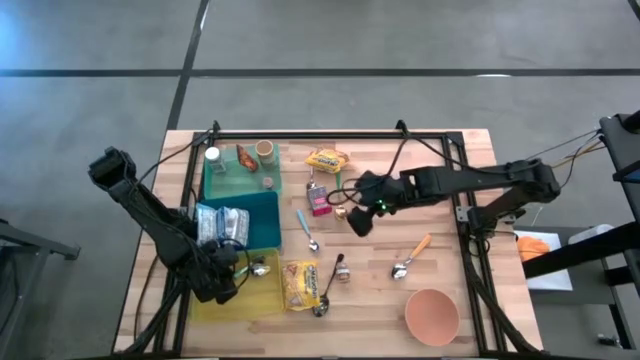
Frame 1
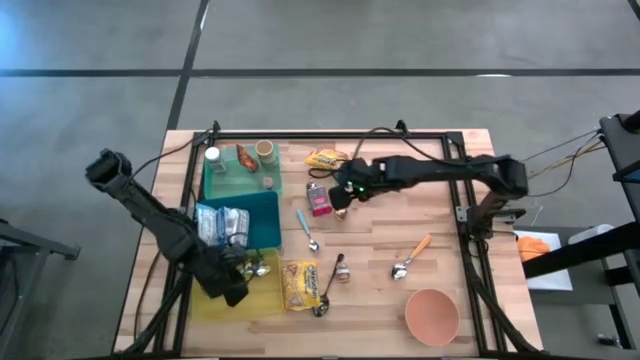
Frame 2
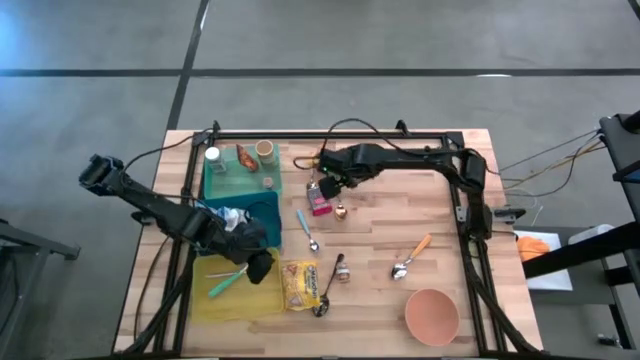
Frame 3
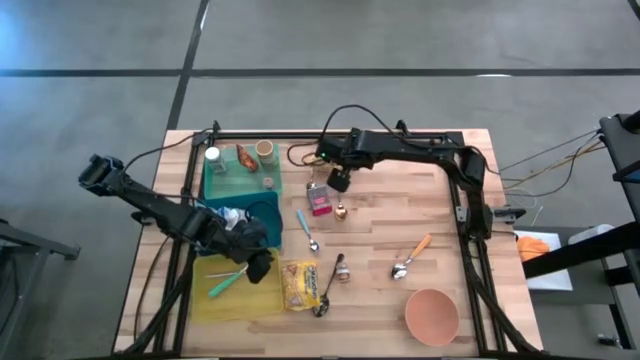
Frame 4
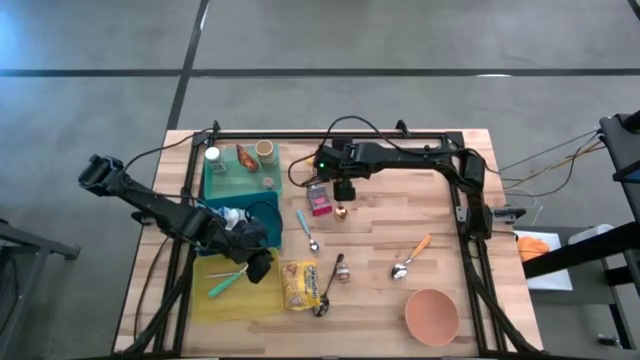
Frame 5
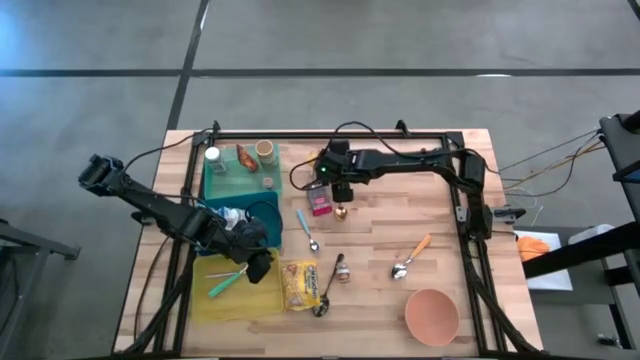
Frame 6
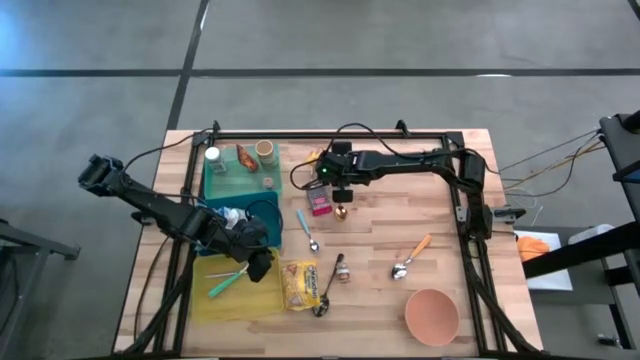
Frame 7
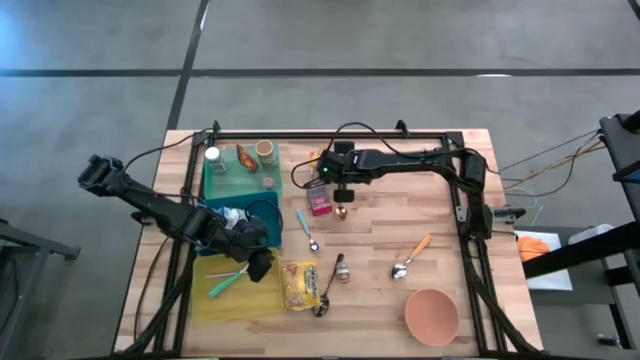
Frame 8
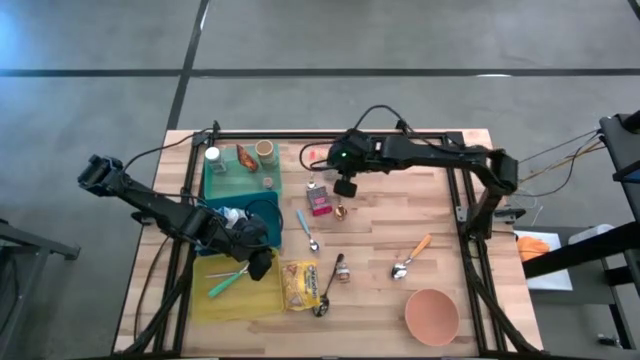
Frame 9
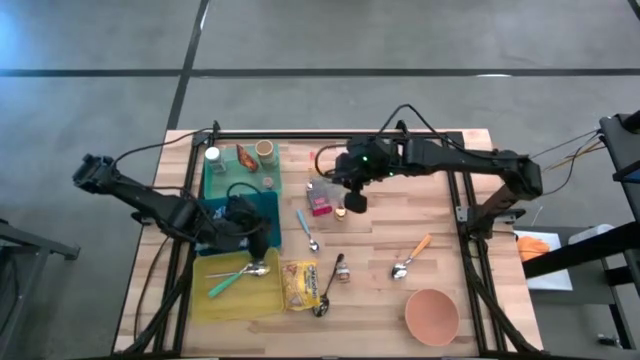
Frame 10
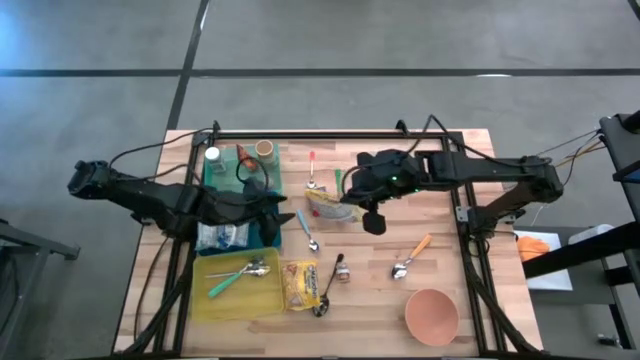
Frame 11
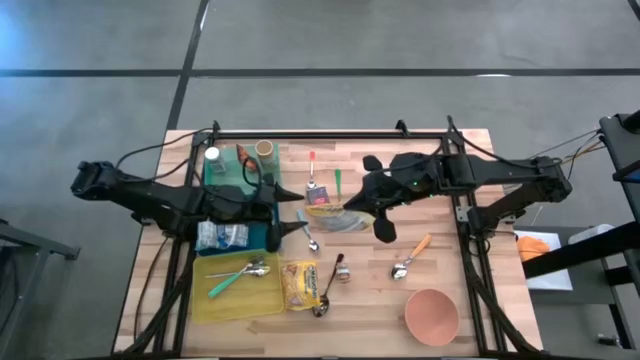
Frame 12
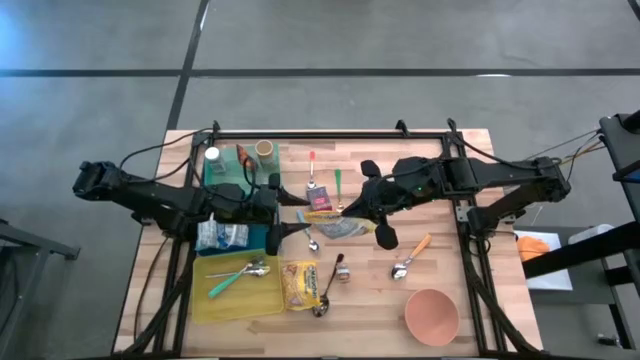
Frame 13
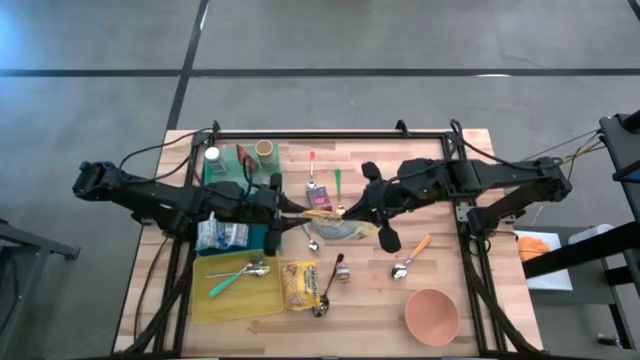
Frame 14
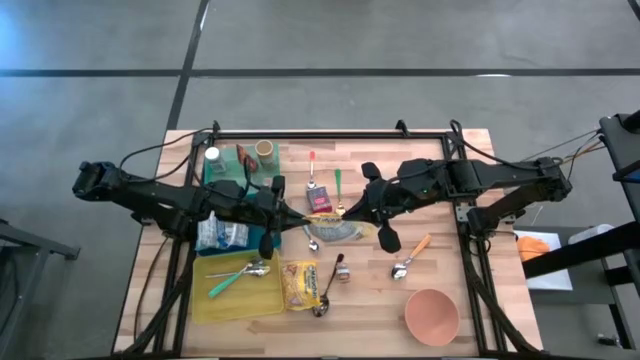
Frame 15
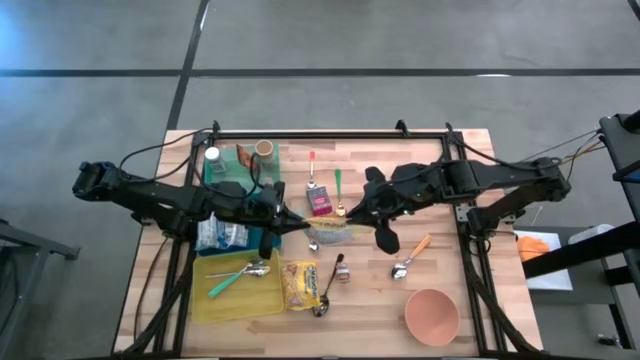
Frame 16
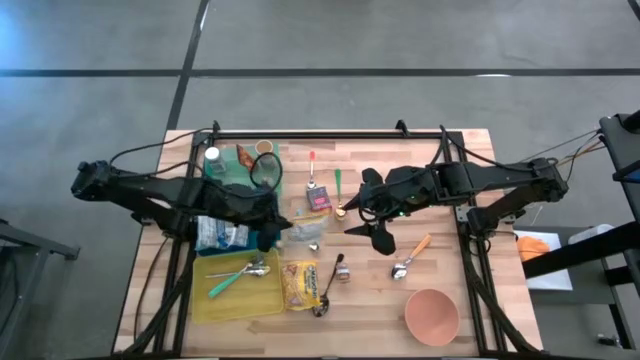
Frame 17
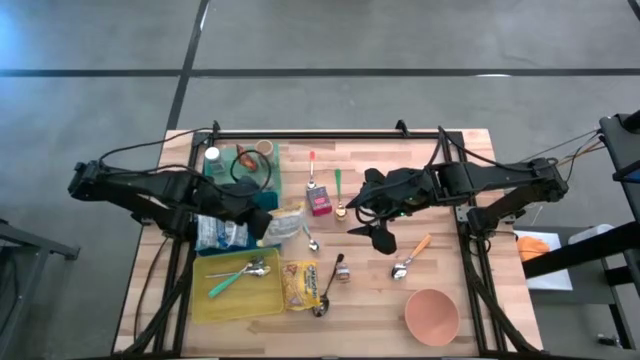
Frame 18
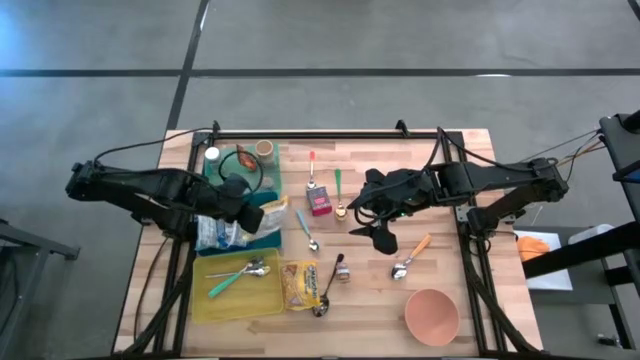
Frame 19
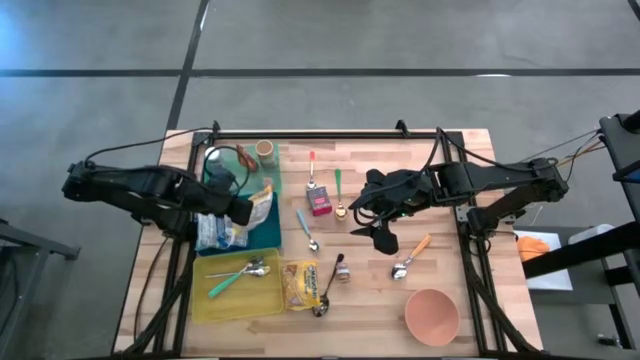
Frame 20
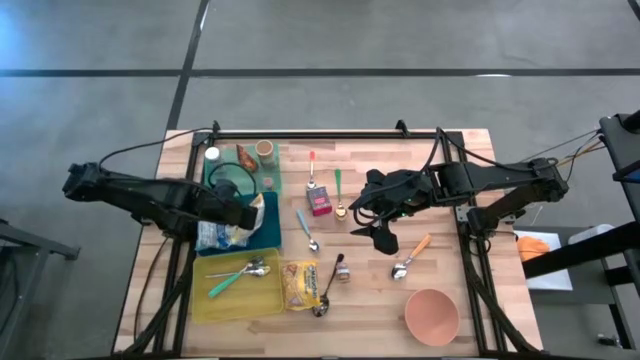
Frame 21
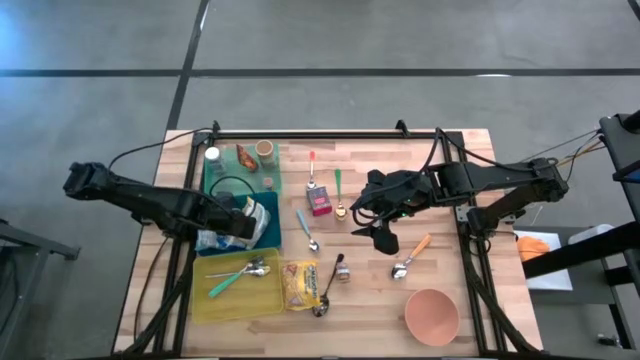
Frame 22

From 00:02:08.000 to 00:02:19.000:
Put the top yellow noodle pack into the dark blue bin

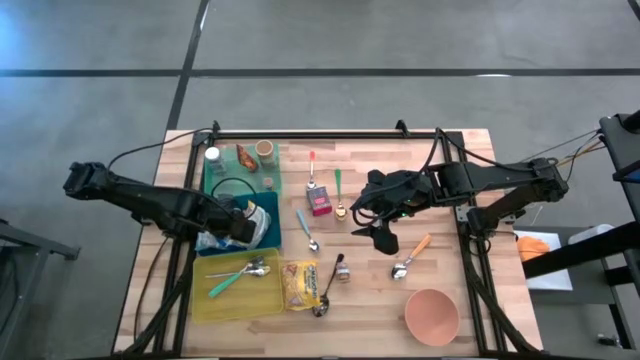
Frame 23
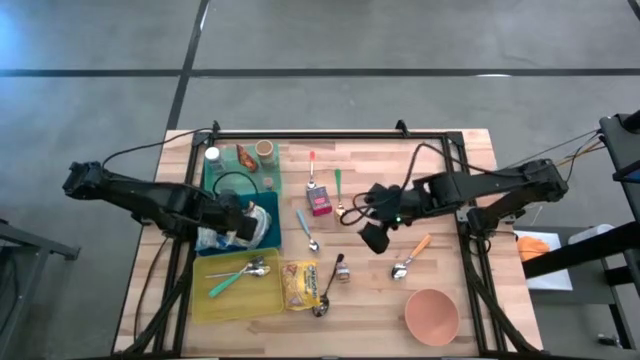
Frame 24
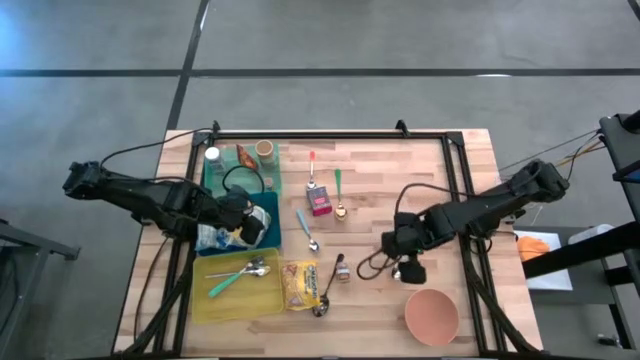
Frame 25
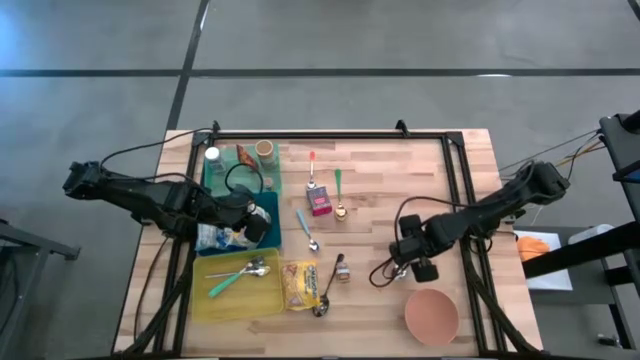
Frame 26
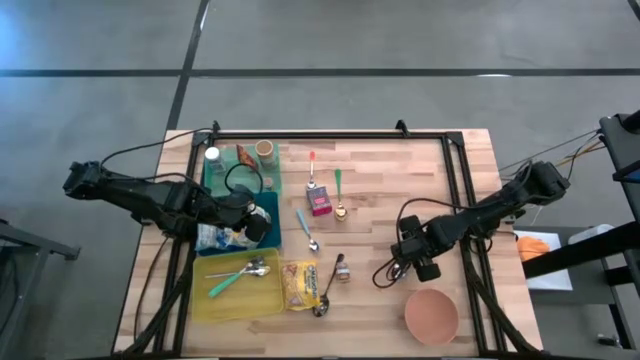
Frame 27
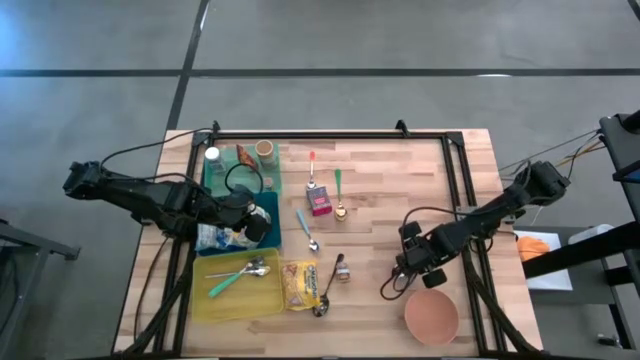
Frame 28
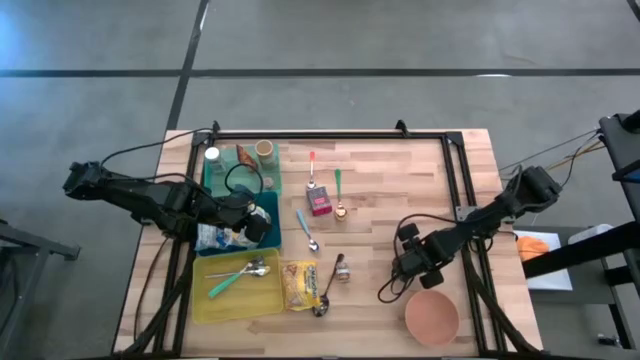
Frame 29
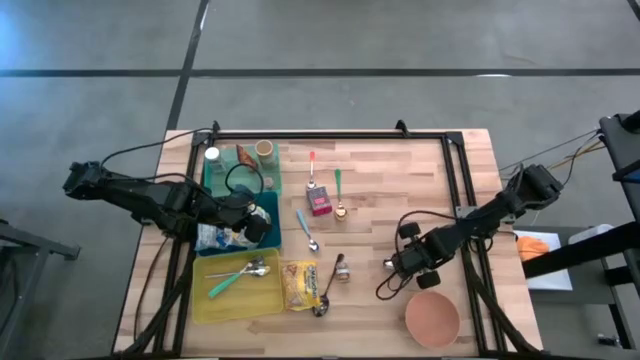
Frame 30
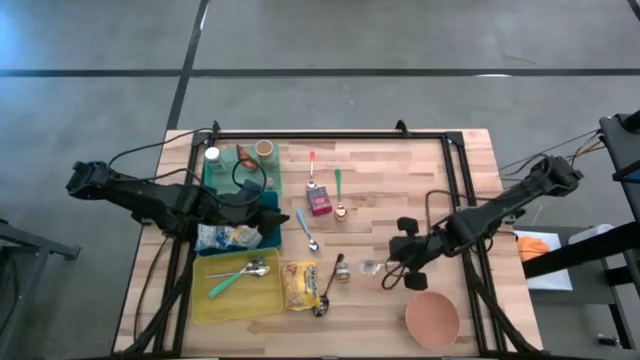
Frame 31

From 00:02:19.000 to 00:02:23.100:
Put the yellow spoon into the yellow bin

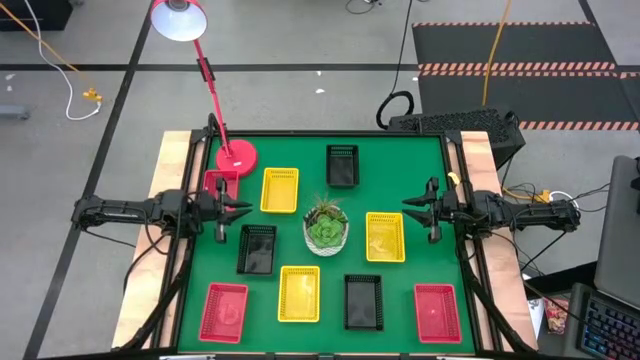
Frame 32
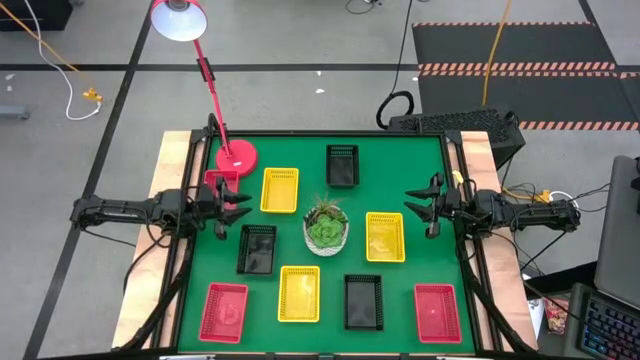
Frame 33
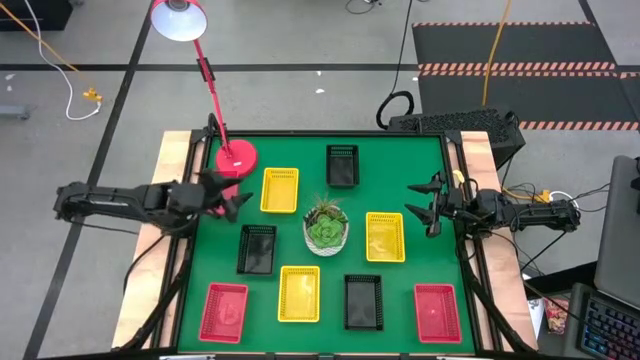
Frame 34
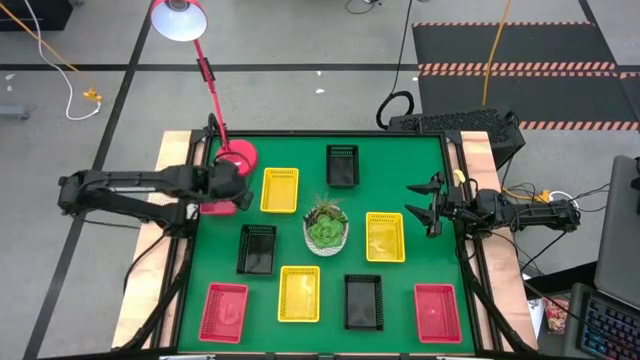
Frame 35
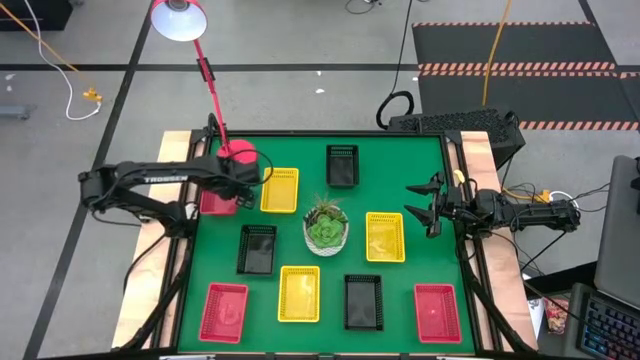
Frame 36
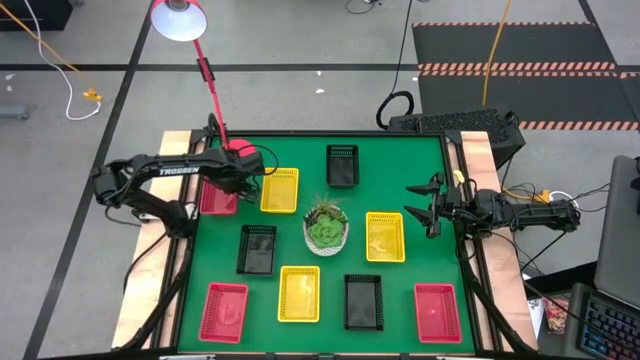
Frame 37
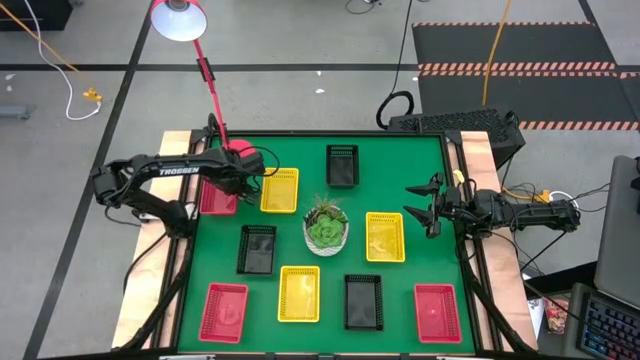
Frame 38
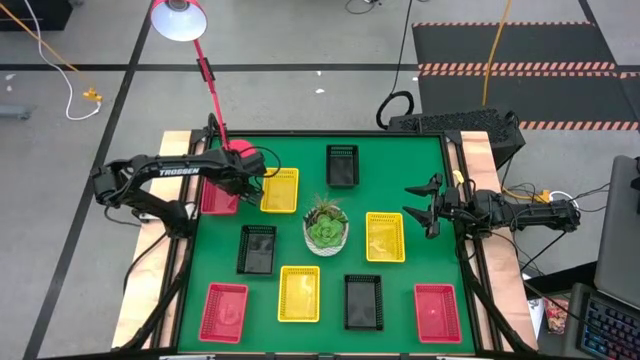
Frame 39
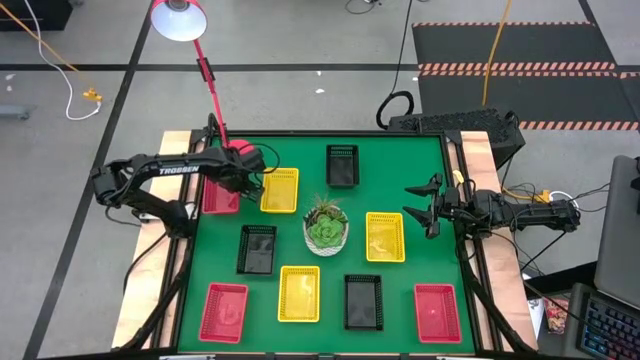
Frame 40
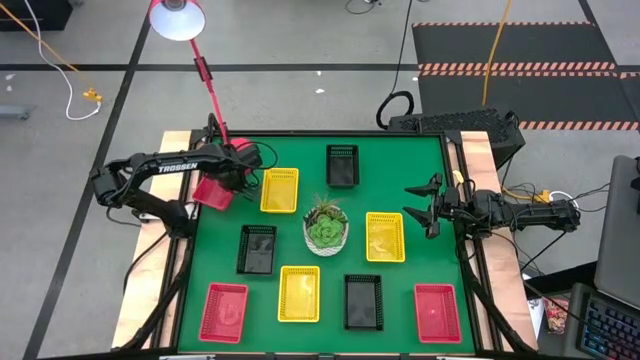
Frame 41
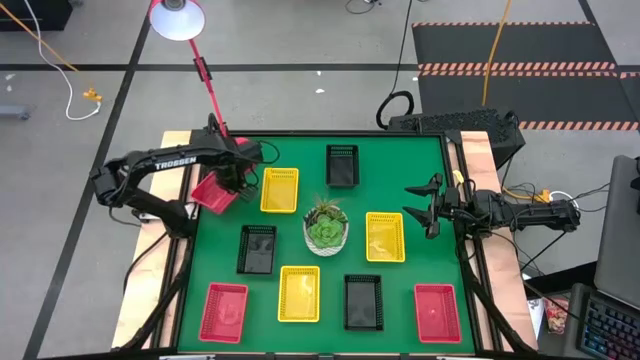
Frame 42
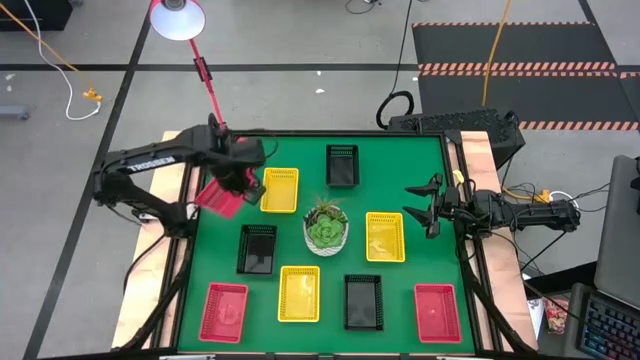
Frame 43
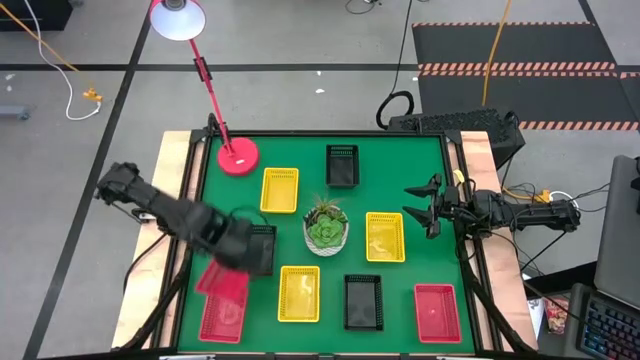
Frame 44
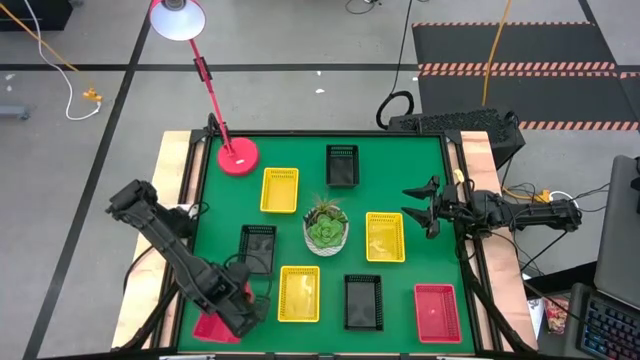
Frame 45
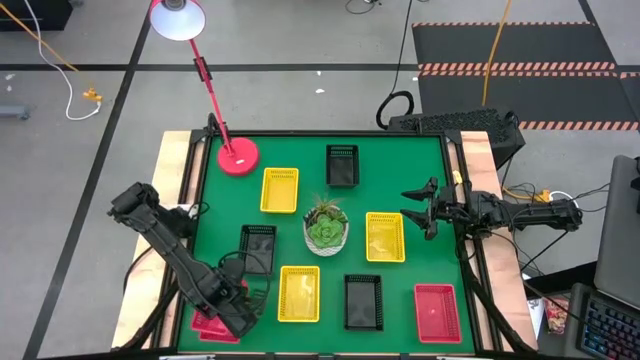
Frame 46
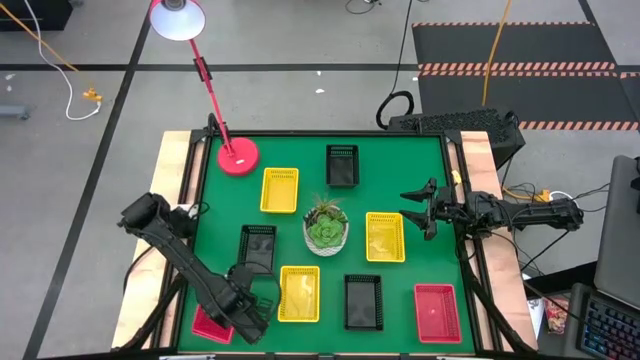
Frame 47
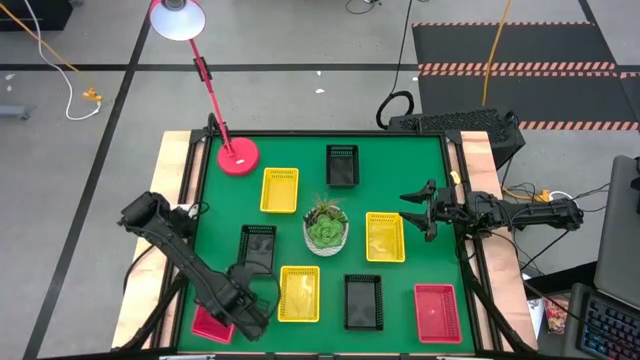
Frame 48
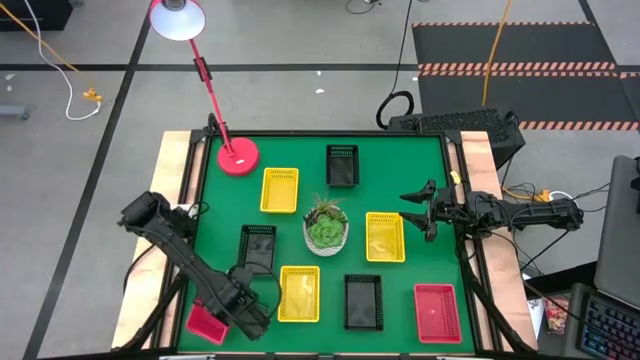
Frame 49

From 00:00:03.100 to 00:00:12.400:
Stack the top red bin on top of the bottom left red bin
